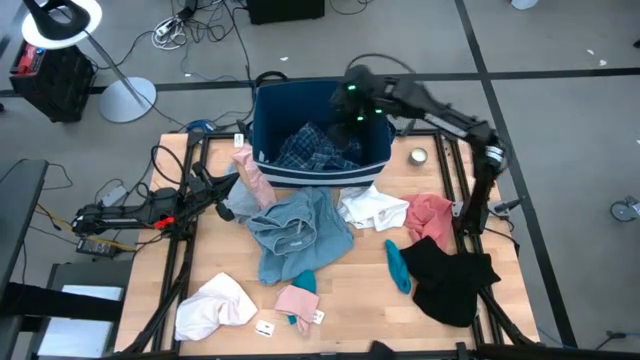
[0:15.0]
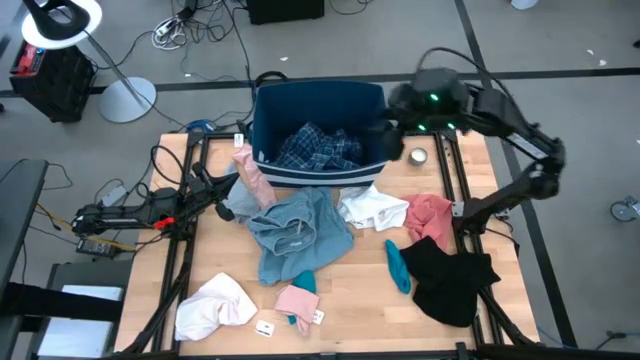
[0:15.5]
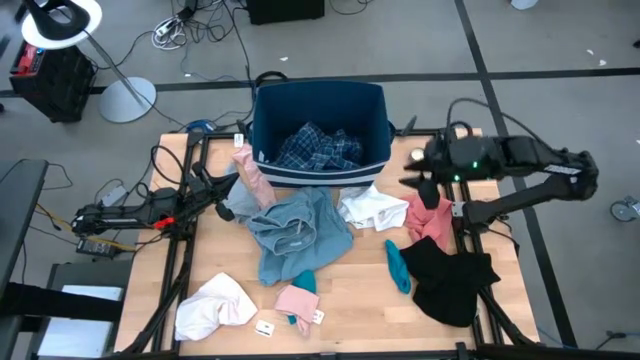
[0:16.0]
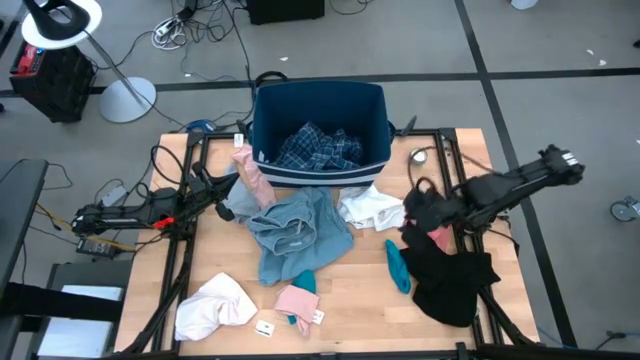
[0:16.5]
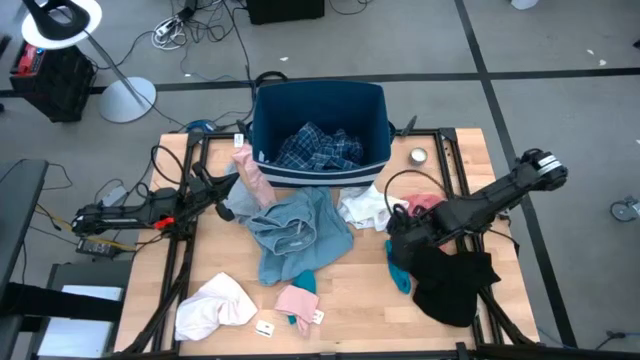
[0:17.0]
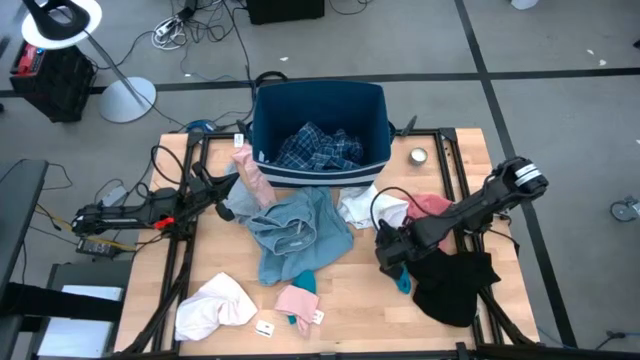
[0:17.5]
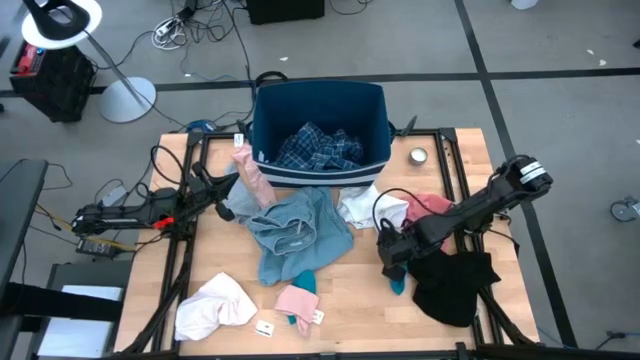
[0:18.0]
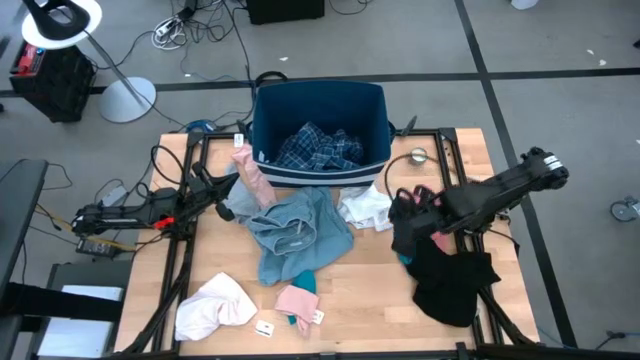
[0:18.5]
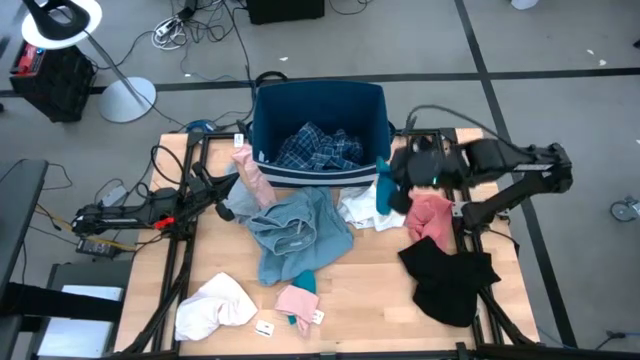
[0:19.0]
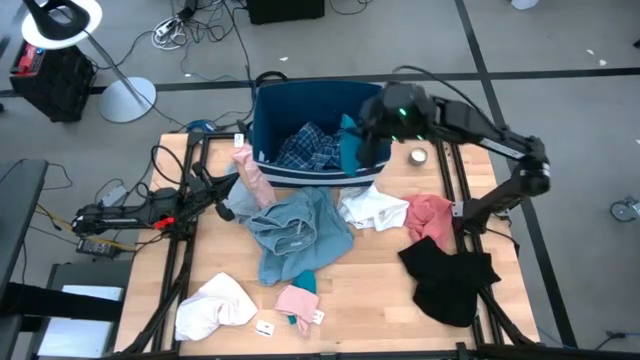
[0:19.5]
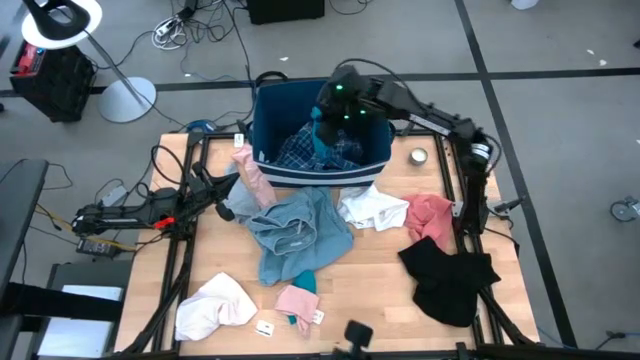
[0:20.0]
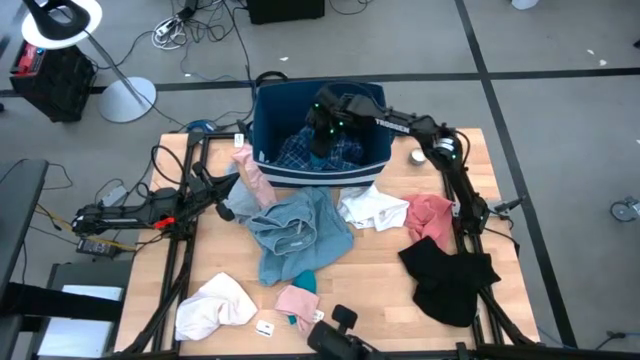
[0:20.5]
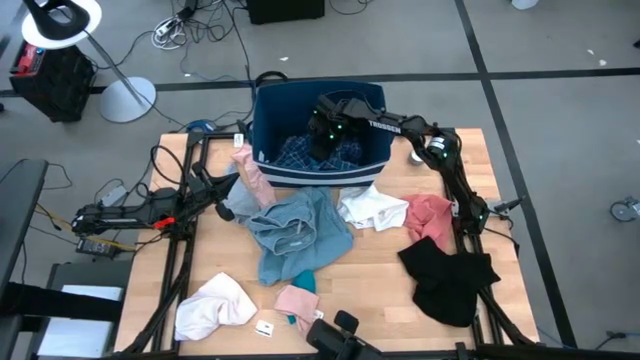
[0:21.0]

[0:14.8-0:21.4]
Task: Sort clothes
Put the right blue sock into the blue laundry bin

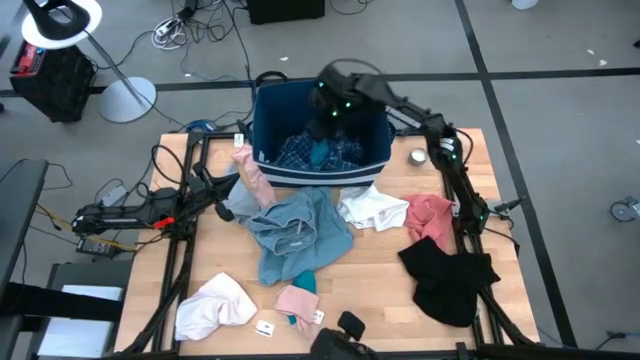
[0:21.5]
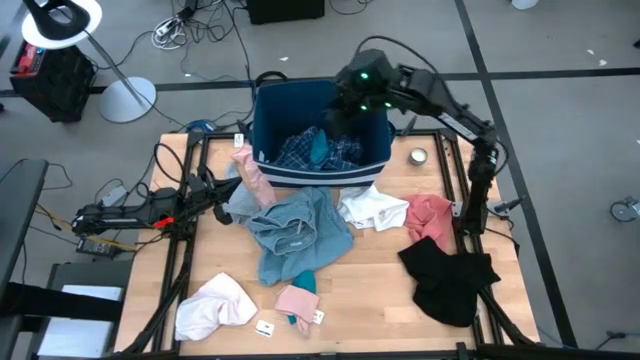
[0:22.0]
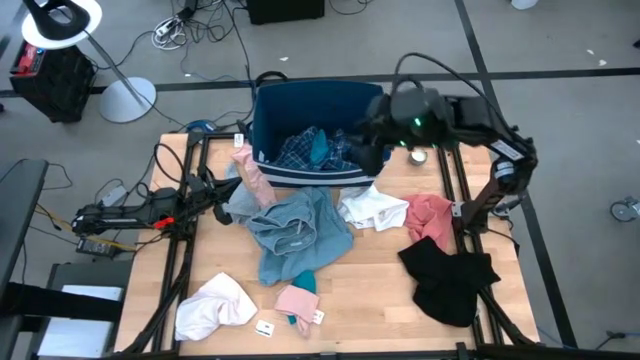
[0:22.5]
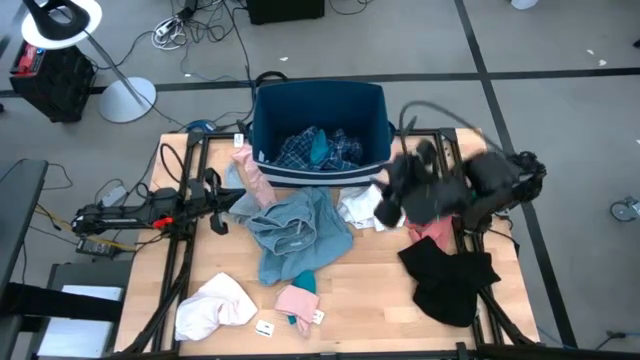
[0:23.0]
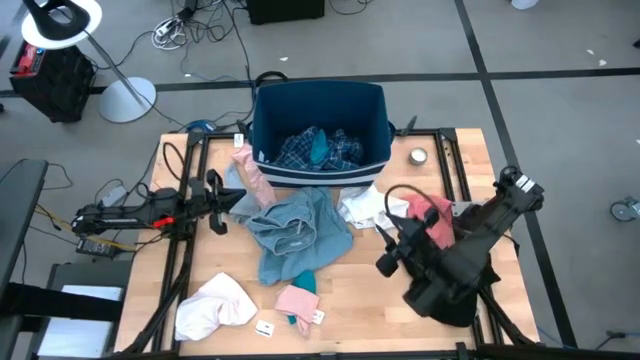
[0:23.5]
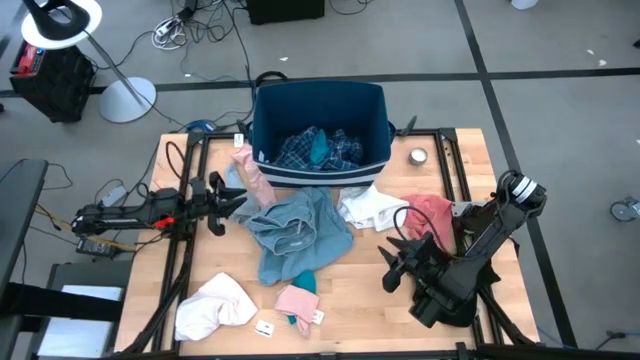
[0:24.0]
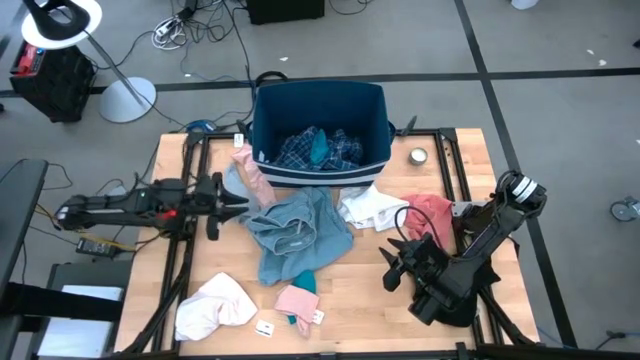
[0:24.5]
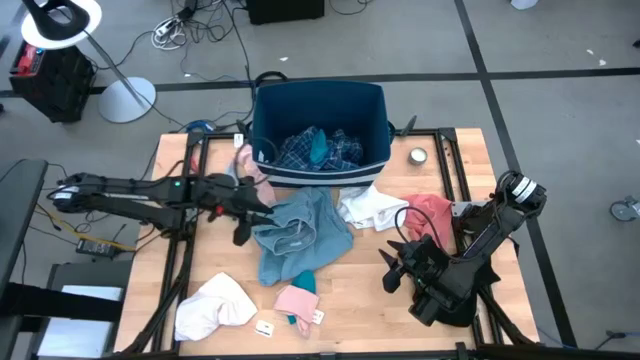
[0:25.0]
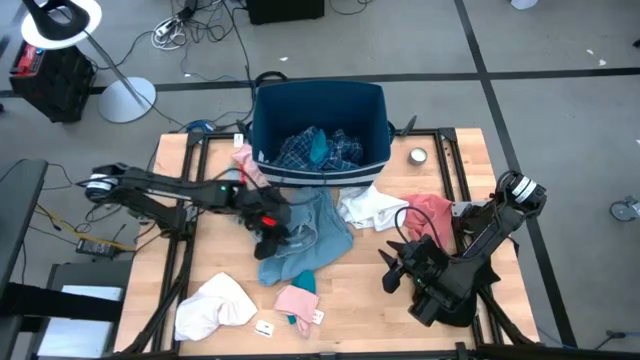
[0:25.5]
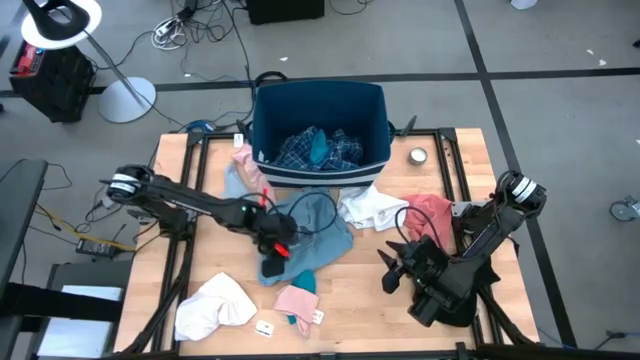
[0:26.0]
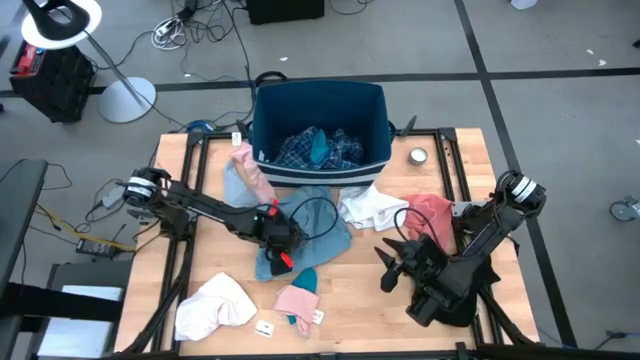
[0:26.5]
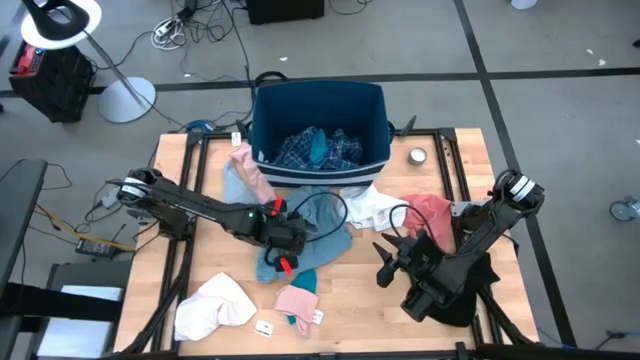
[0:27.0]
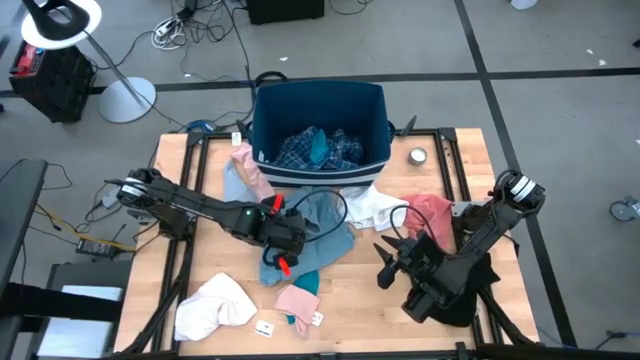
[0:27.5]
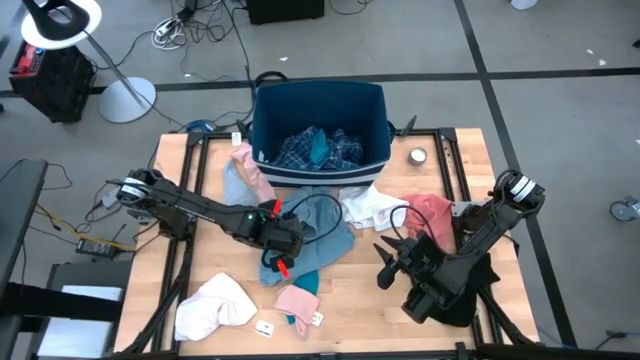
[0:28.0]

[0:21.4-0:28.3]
Put the blue jeans into the blue laundry bin

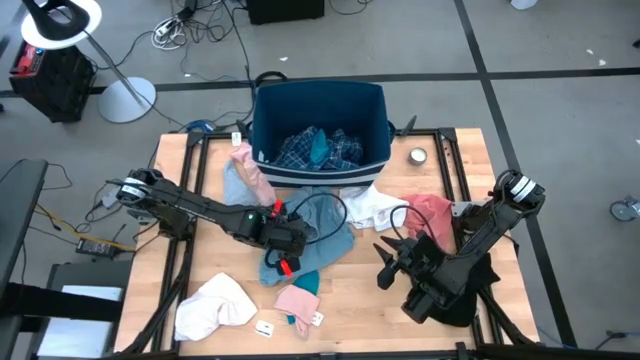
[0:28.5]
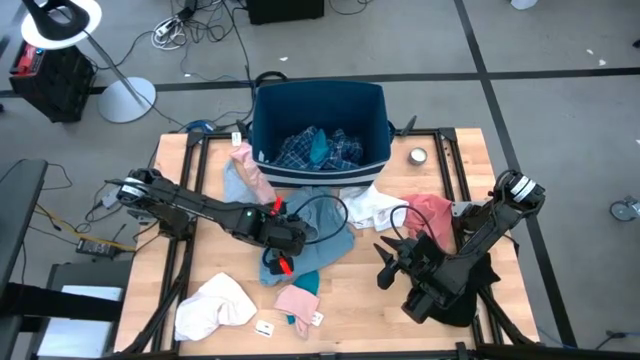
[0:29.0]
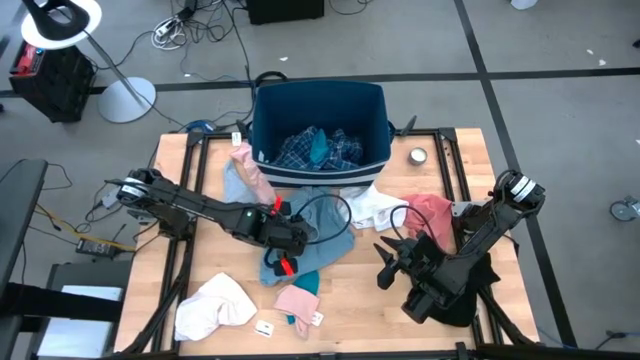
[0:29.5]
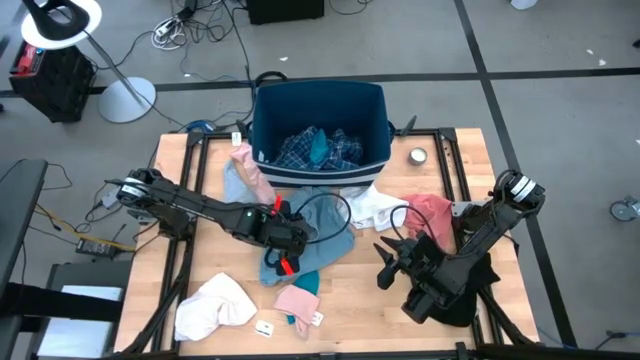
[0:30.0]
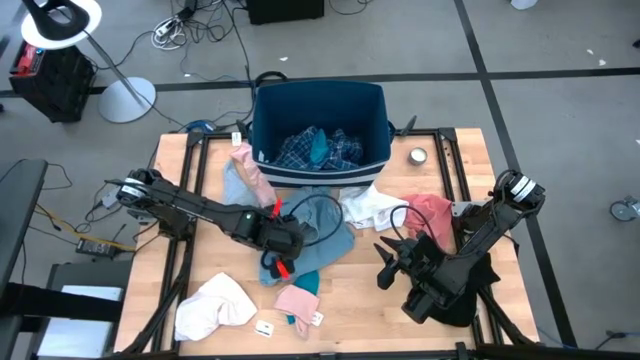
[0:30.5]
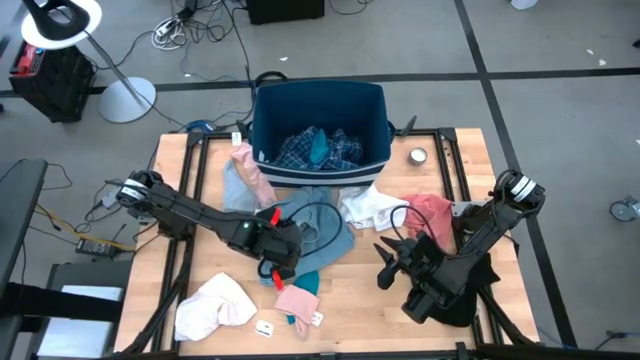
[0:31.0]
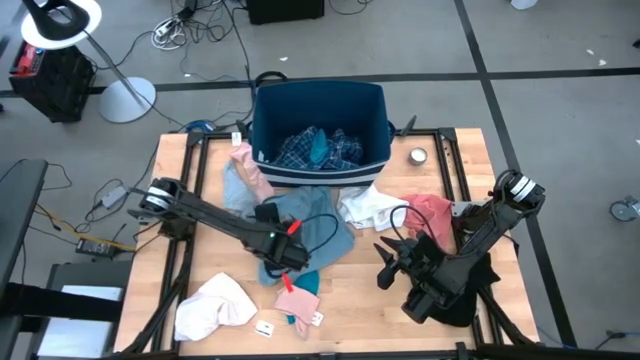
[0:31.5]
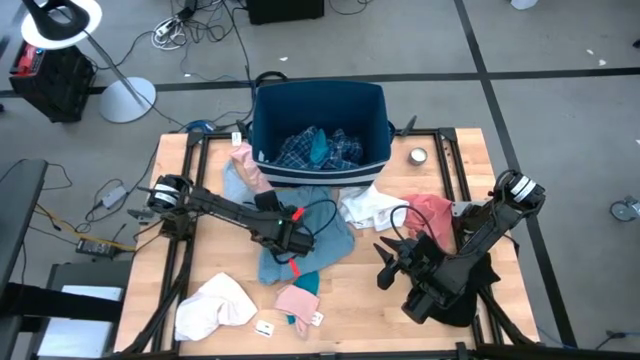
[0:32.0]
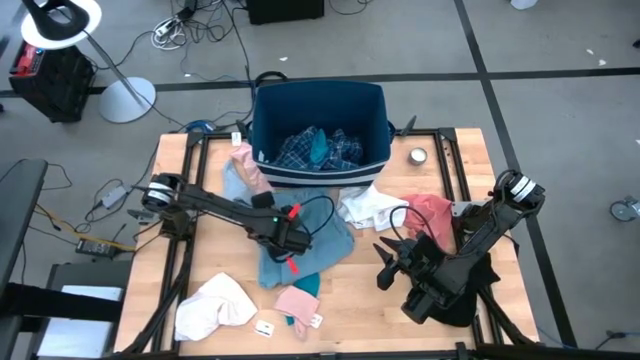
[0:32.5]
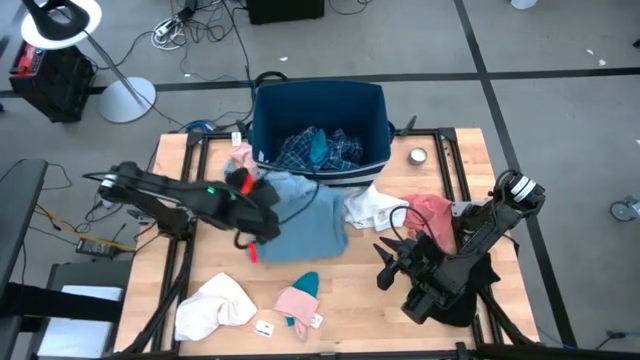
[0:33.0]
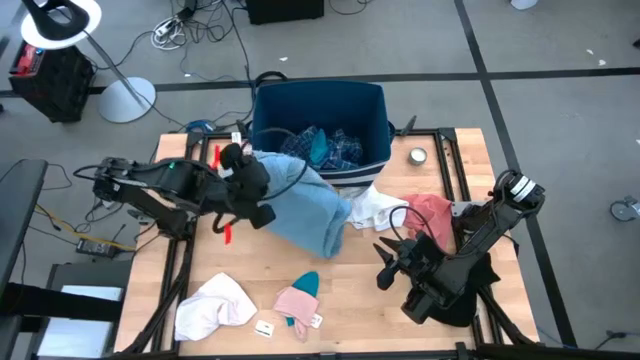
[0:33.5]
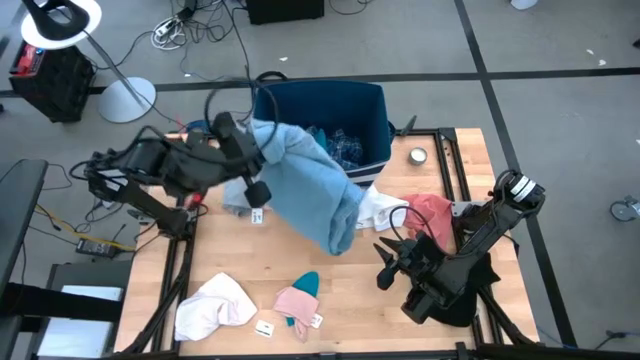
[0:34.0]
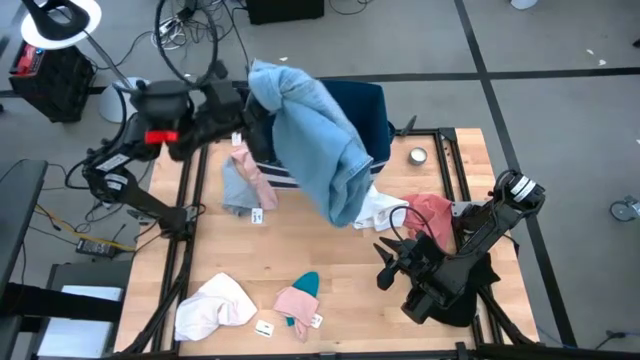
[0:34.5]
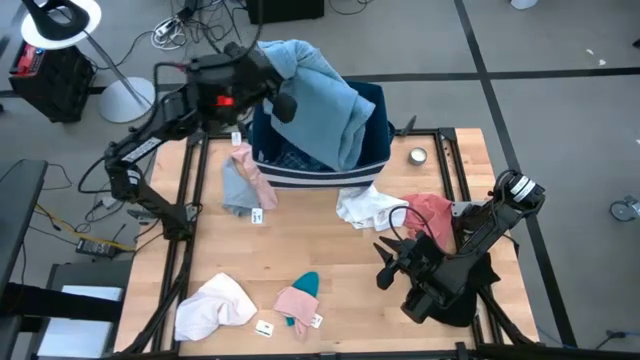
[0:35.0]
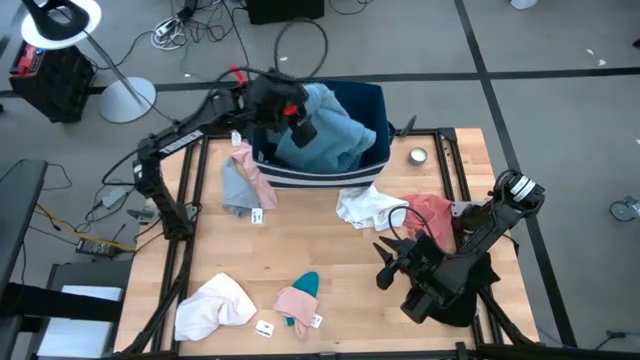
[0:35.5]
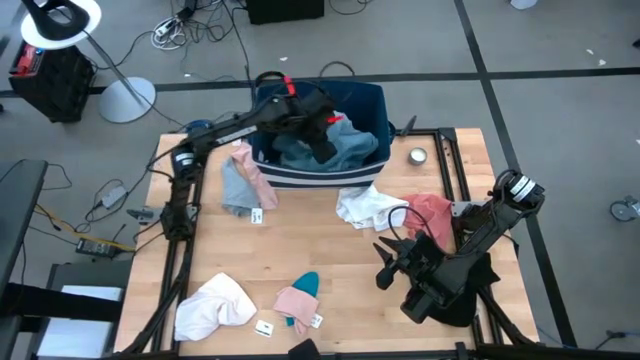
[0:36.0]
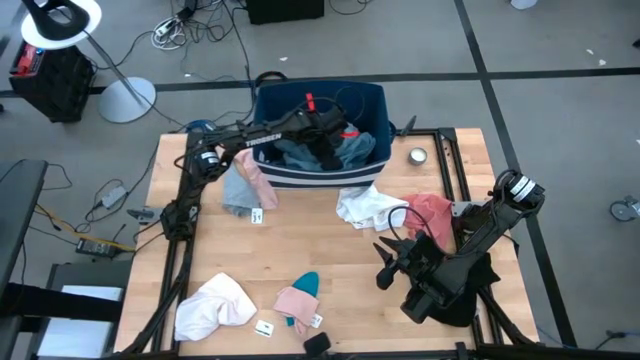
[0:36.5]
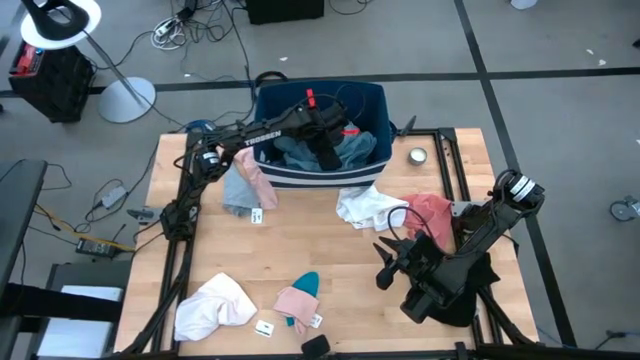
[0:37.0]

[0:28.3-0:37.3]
Put the blue jeans into the blue laundry bin
